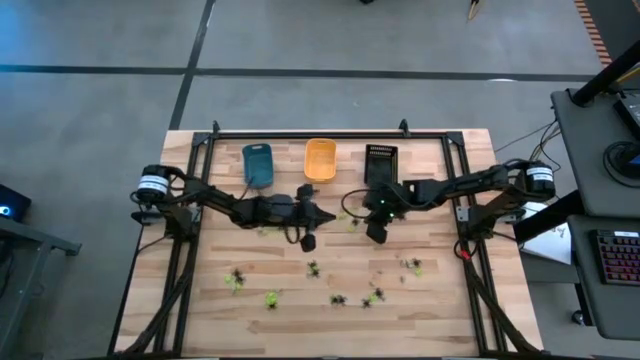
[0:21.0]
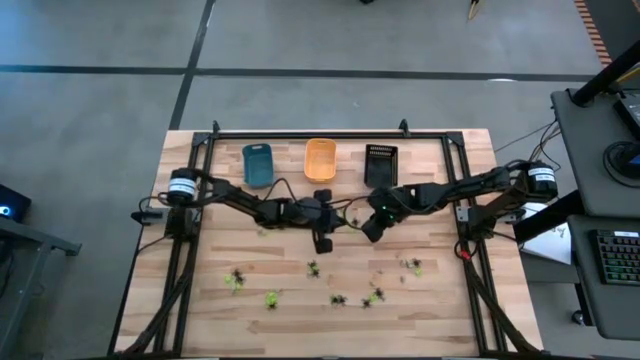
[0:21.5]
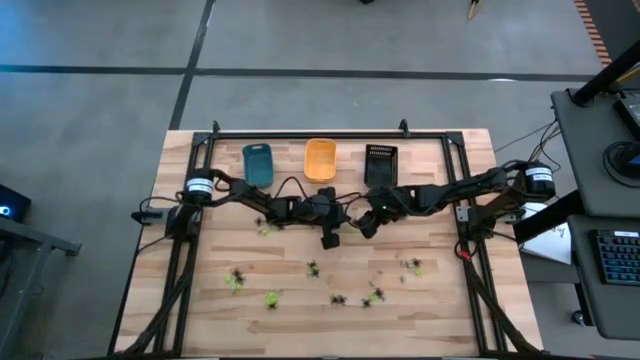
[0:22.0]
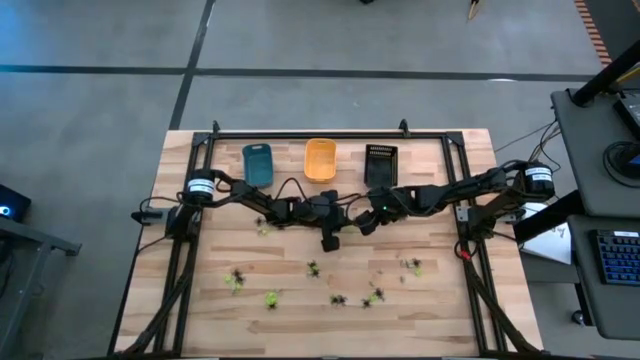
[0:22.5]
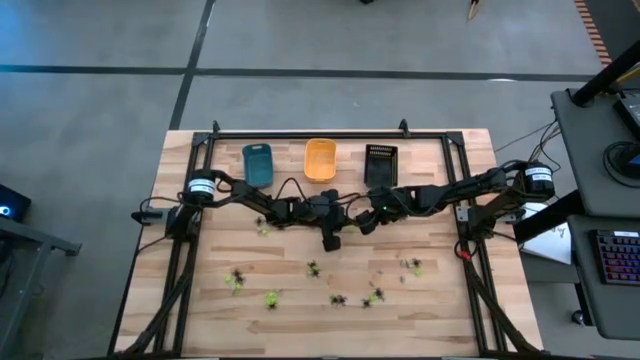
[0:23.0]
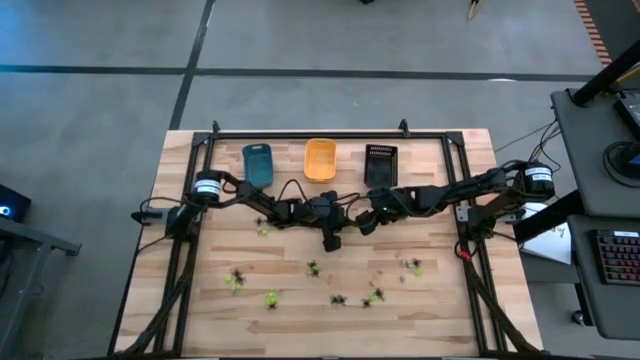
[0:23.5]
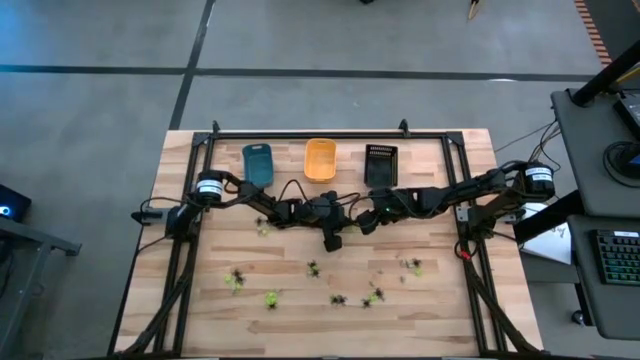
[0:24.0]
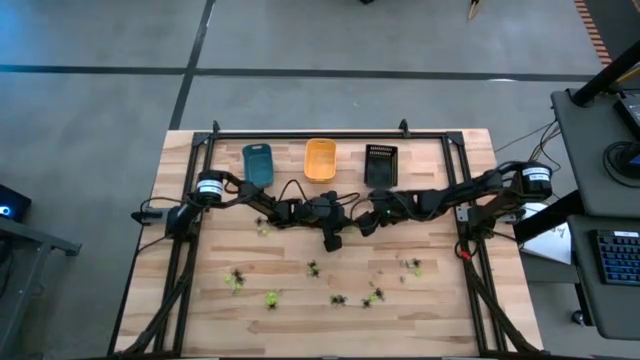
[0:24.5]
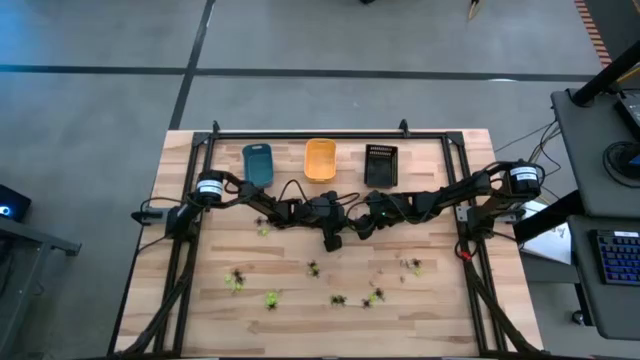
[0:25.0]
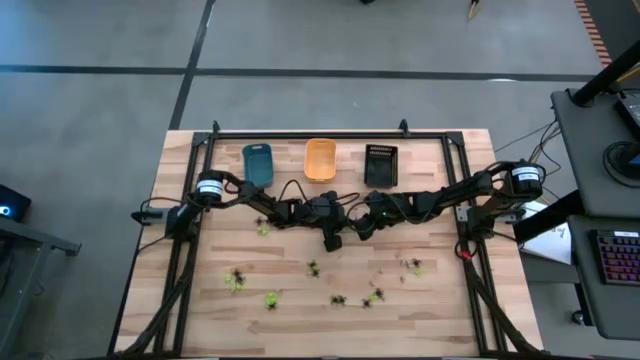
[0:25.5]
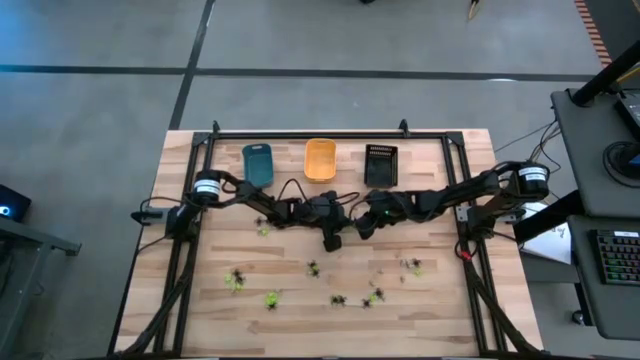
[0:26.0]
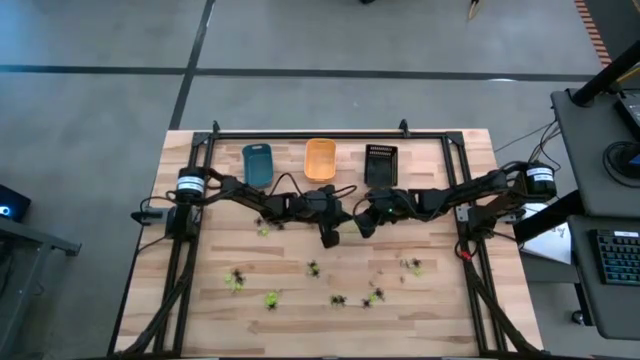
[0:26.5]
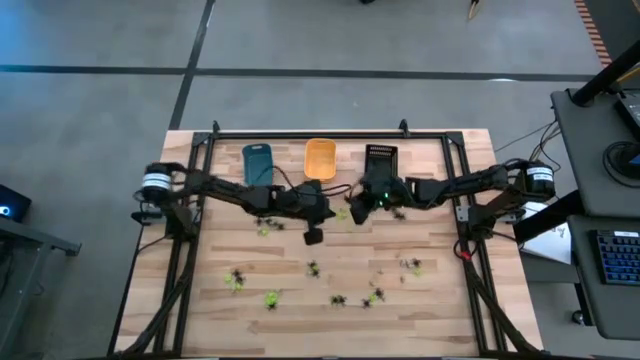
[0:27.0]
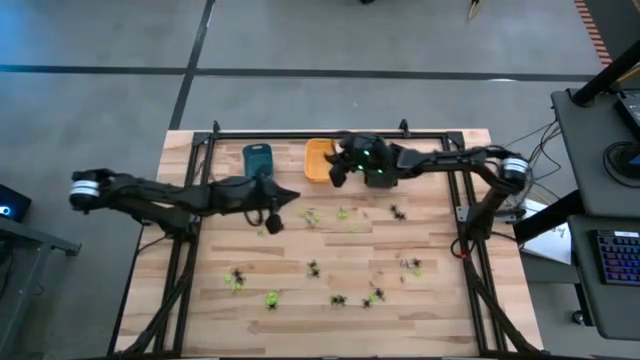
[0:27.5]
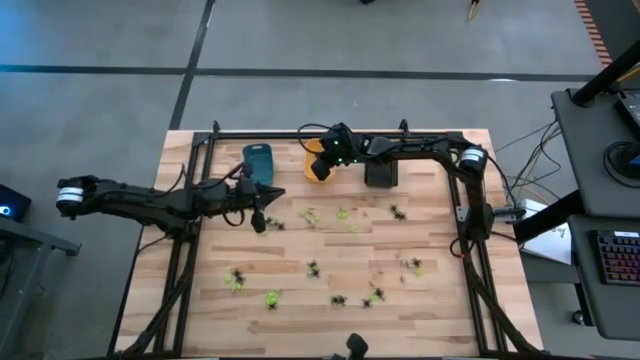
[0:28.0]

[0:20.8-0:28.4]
Task: Sort Halloween decoration
Put the black spider toy into the orange bin

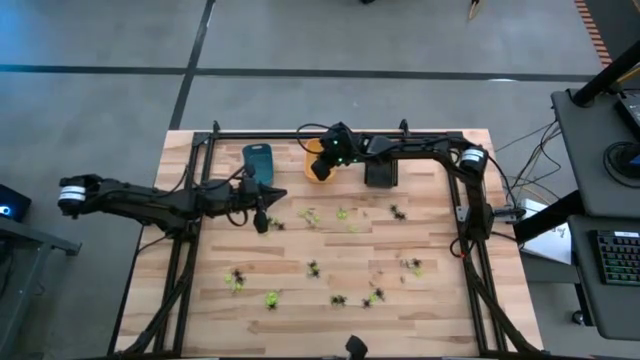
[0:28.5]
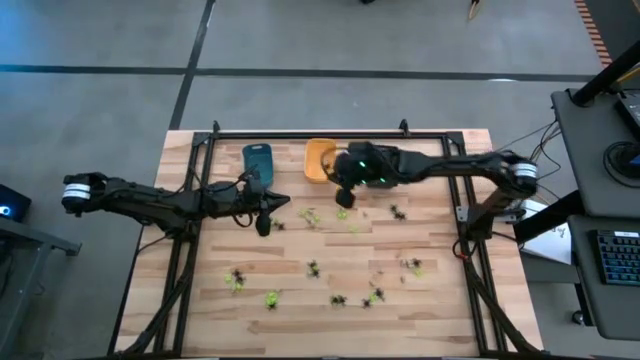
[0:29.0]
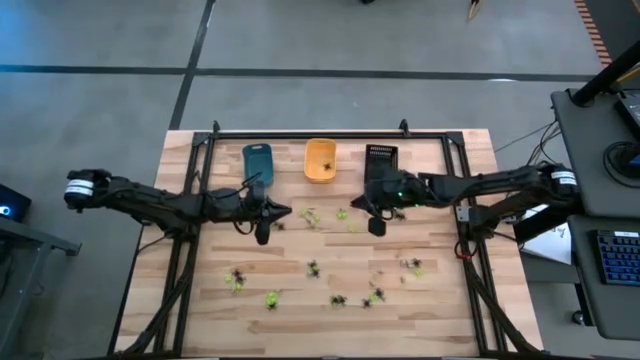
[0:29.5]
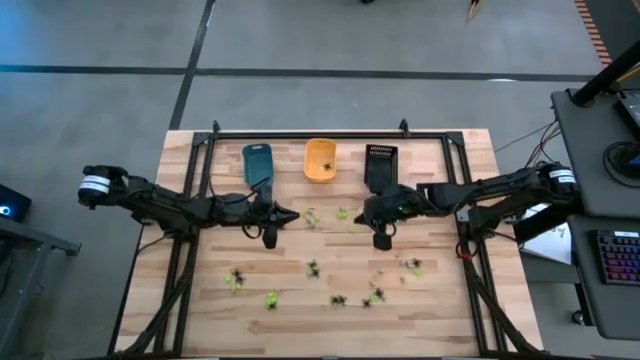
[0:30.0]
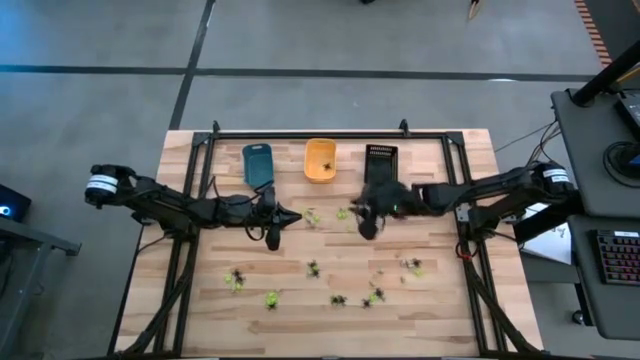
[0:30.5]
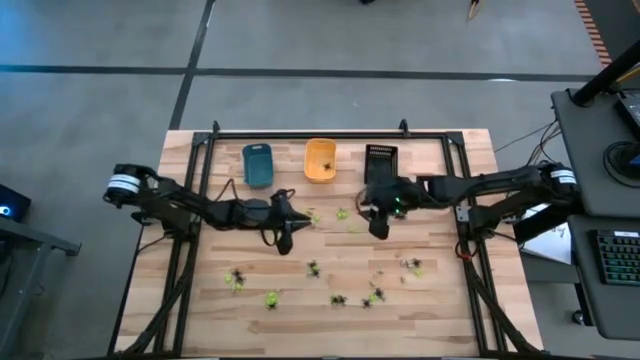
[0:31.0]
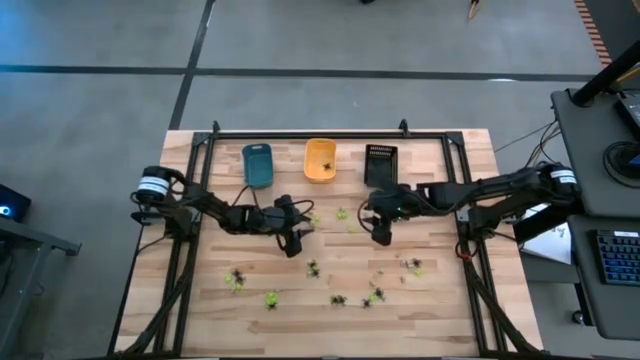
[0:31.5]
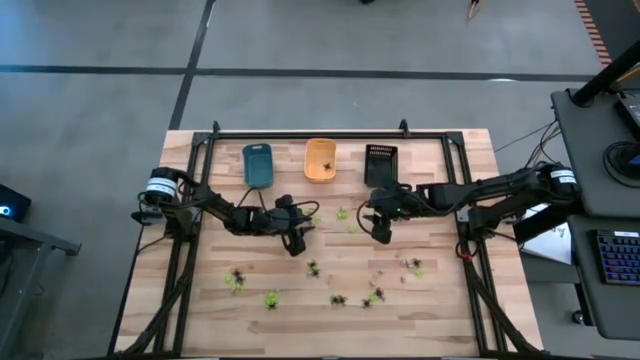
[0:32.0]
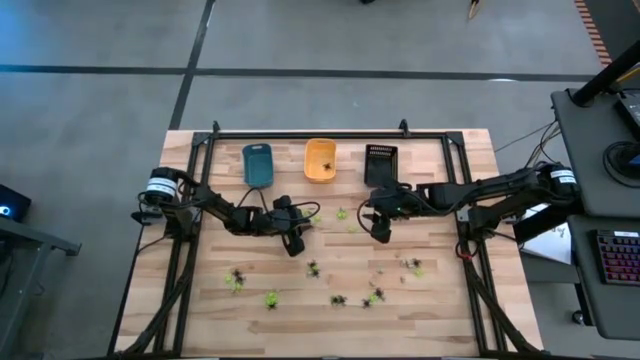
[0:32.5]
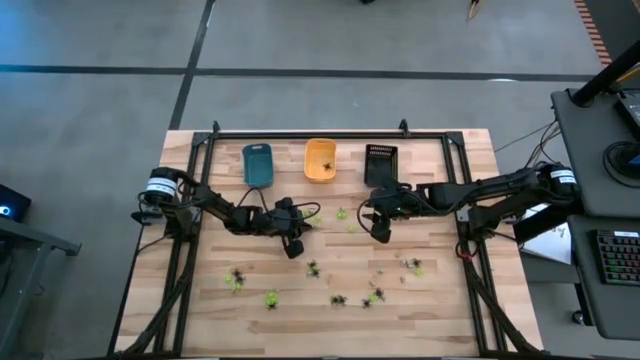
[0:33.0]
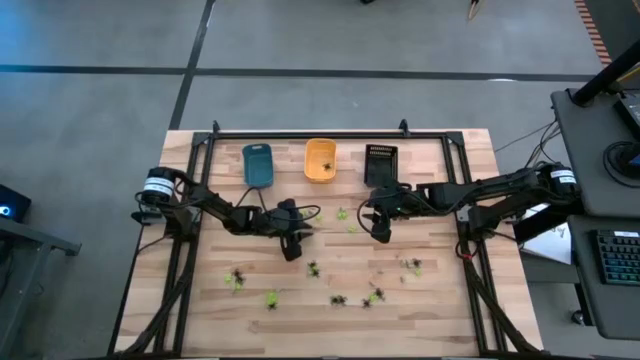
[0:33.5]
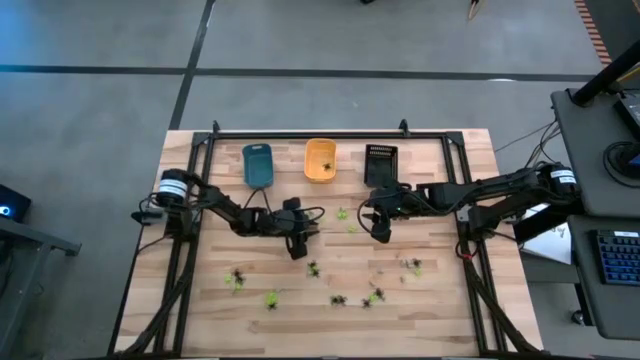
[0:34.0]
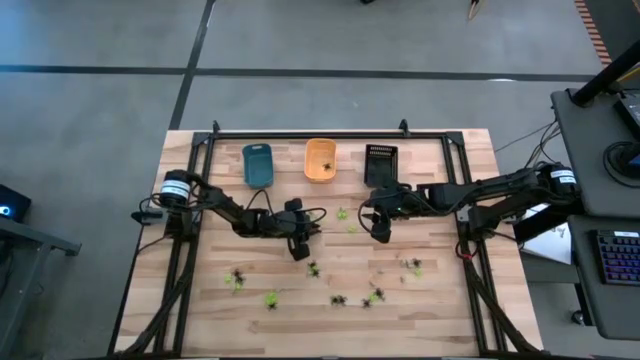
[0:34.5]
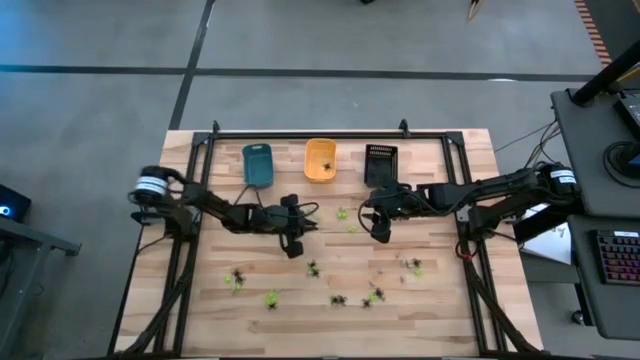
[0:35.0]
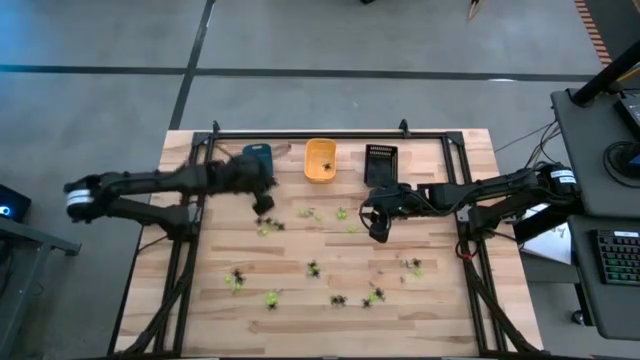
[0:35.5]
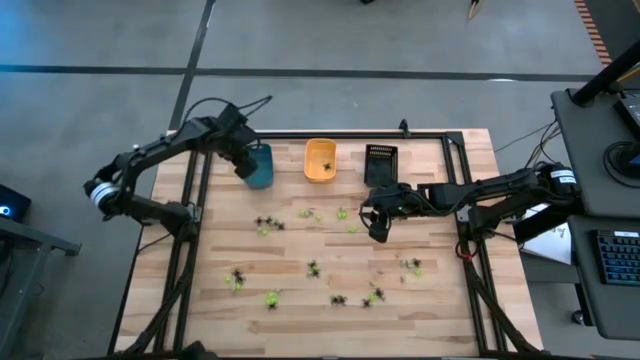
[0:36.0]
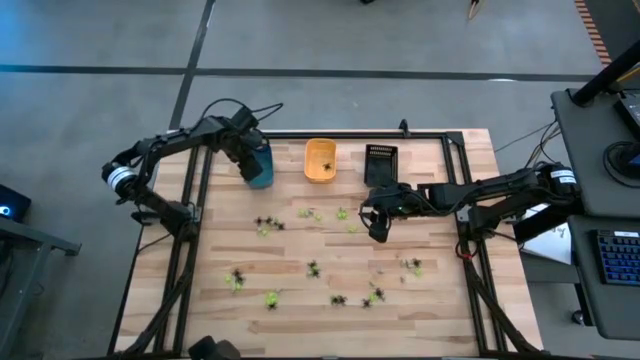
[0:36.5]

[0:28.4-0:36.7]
Put the white skull toy into the blue bin

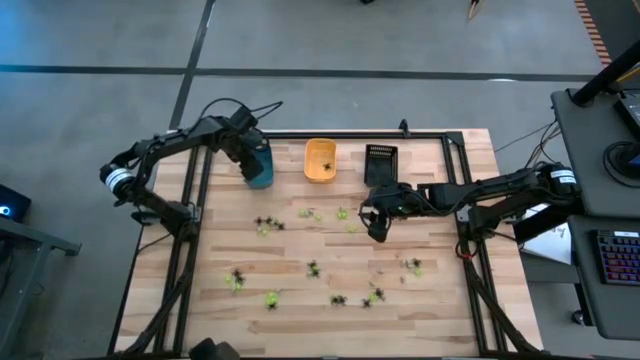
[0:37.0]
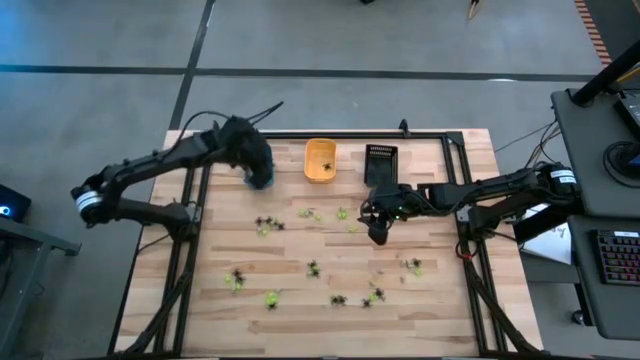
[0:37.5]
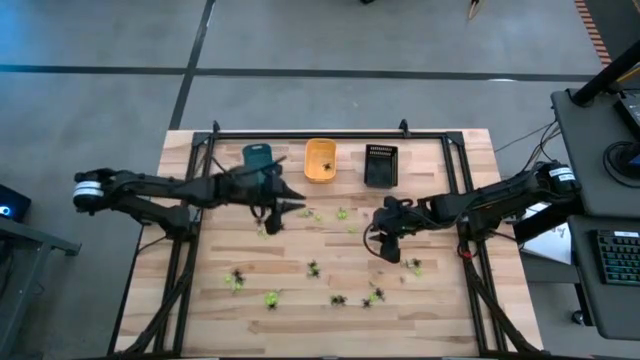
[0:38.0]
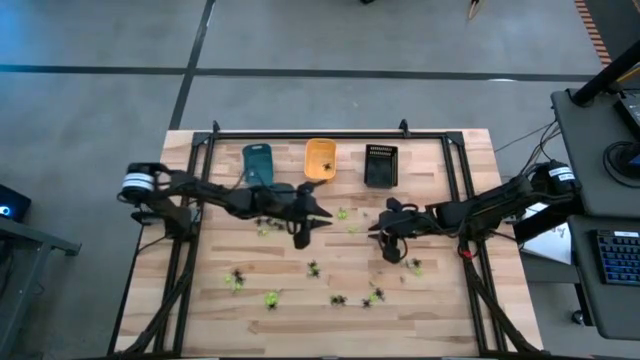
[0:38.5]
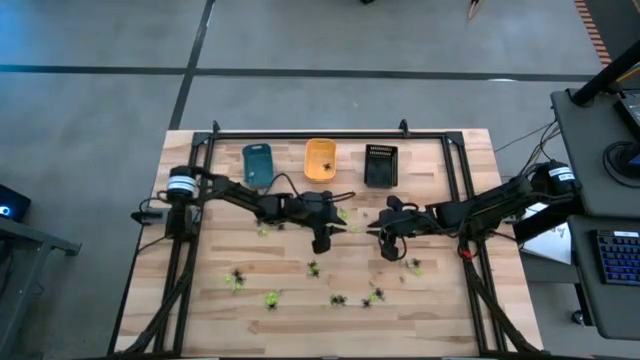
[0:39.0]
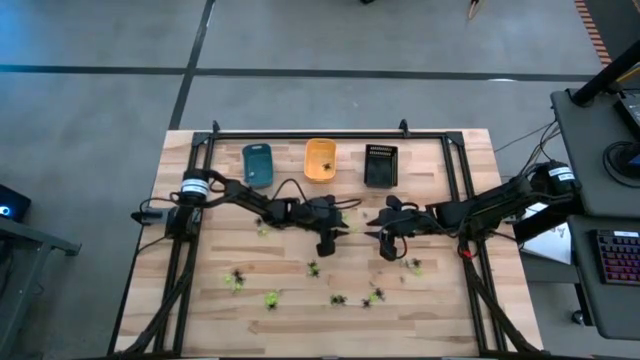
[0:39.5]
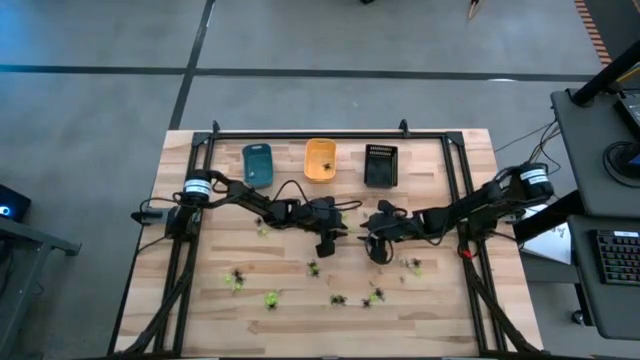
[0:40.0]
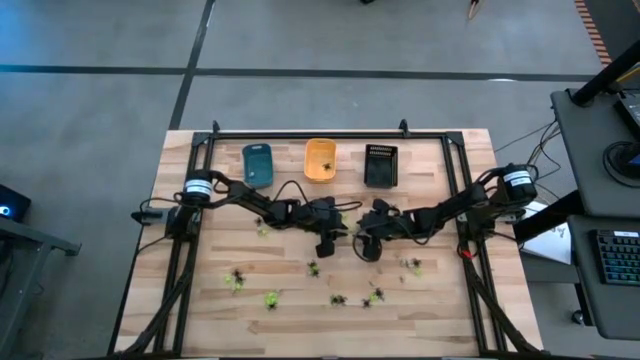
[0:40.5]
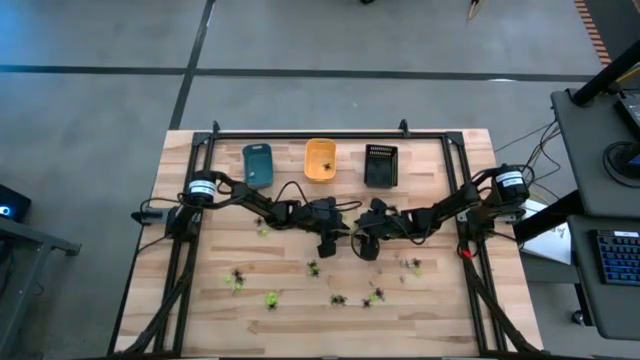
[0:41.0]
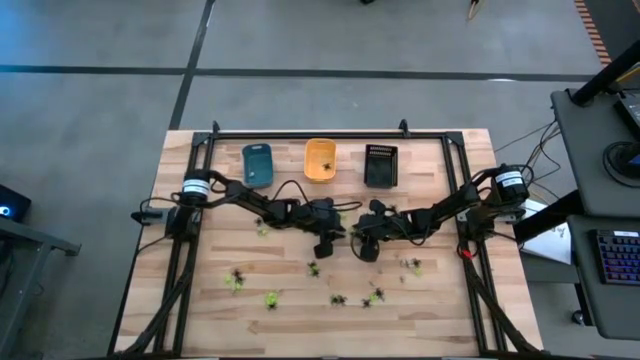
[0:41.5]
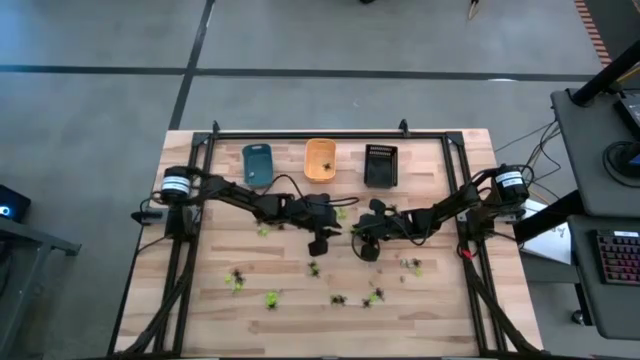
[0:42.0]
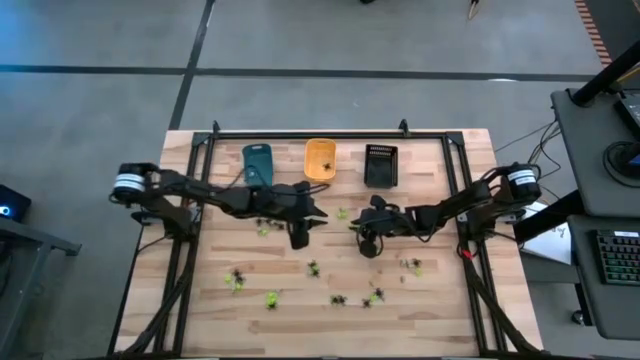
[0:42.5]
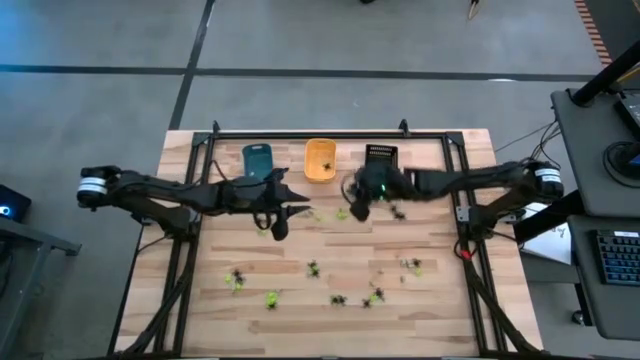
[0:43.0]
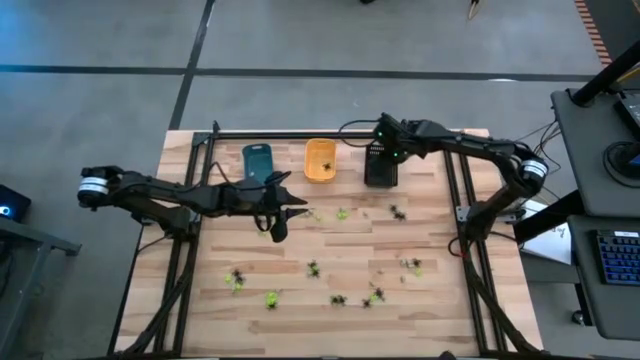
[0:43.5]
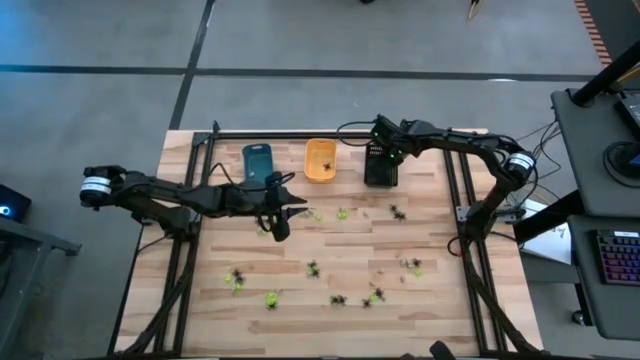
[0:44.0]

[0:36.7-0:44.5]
Put the green spider toy into the black bin
